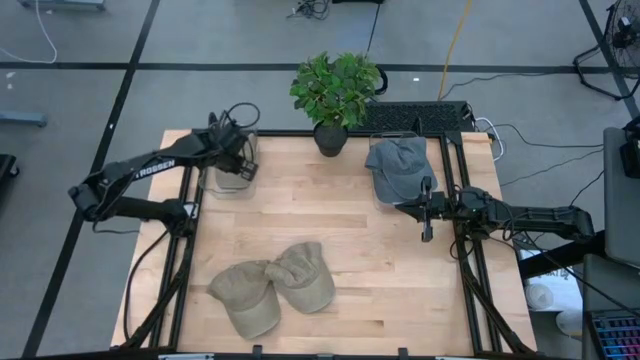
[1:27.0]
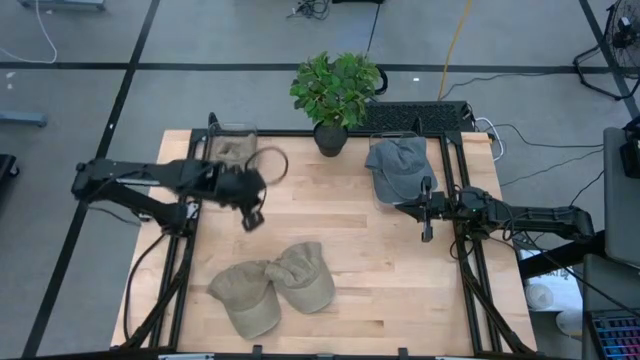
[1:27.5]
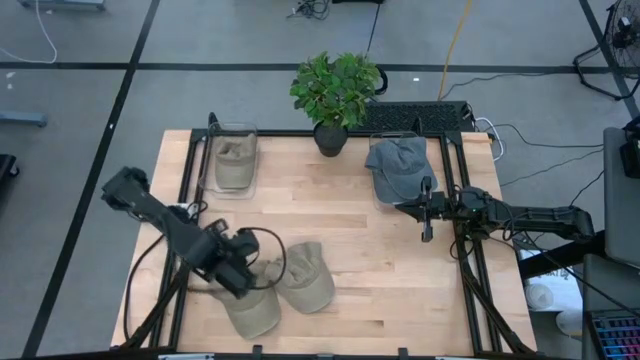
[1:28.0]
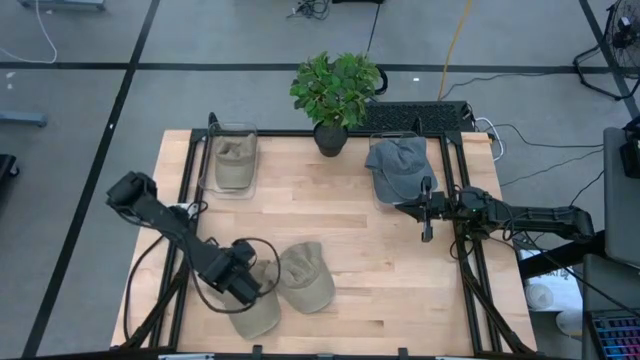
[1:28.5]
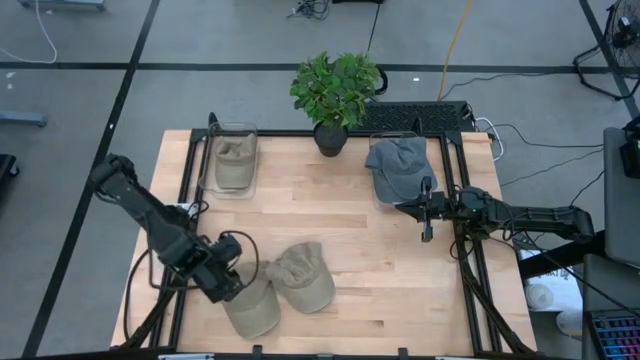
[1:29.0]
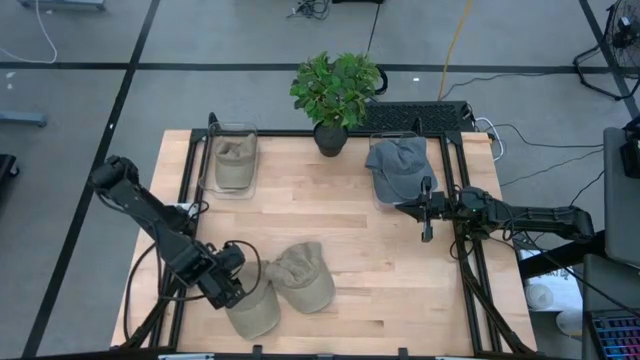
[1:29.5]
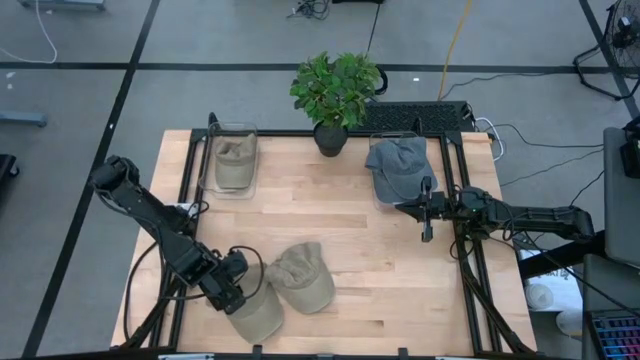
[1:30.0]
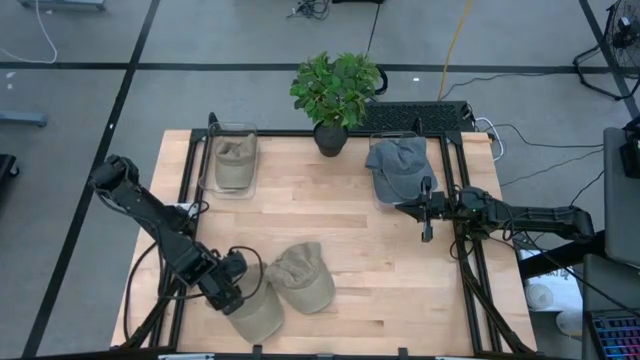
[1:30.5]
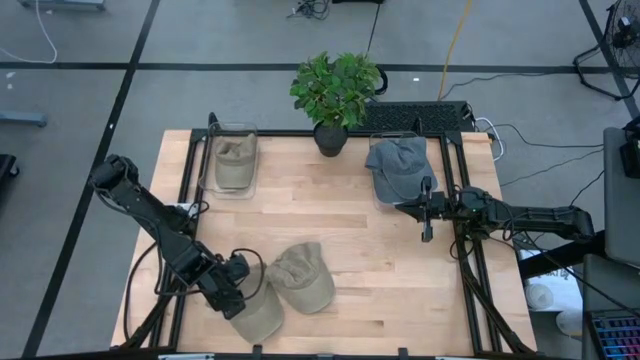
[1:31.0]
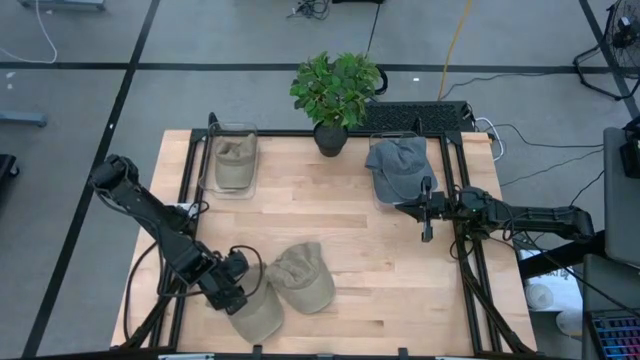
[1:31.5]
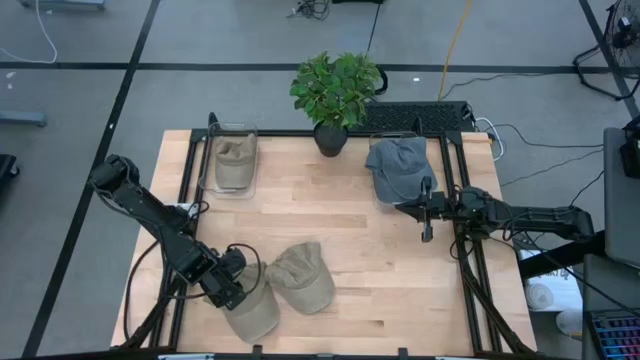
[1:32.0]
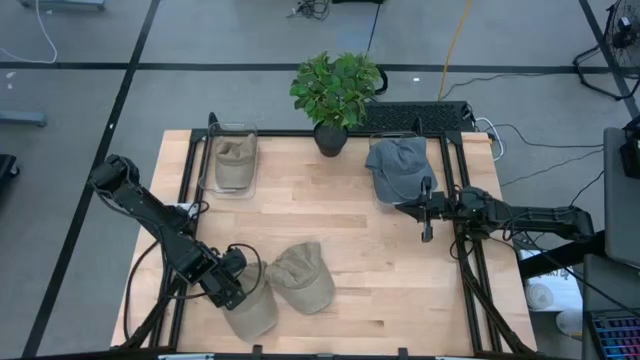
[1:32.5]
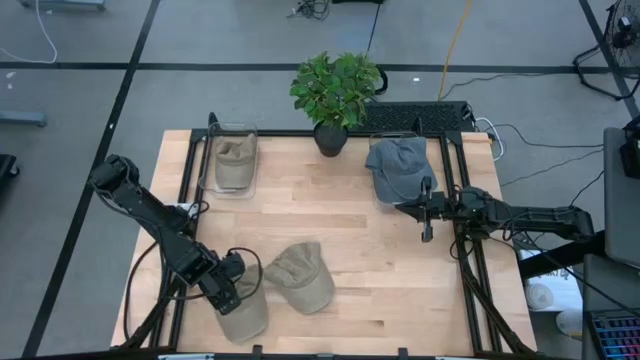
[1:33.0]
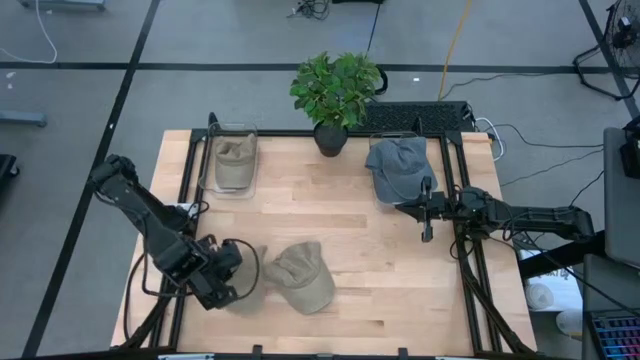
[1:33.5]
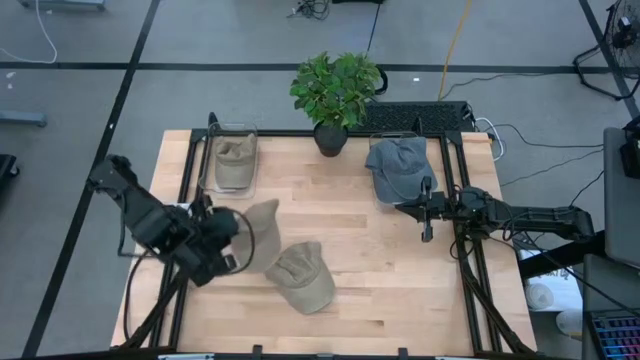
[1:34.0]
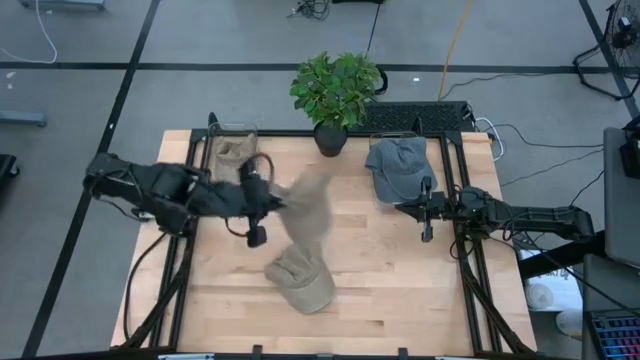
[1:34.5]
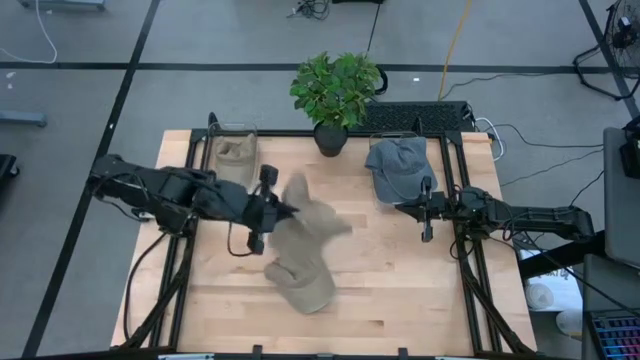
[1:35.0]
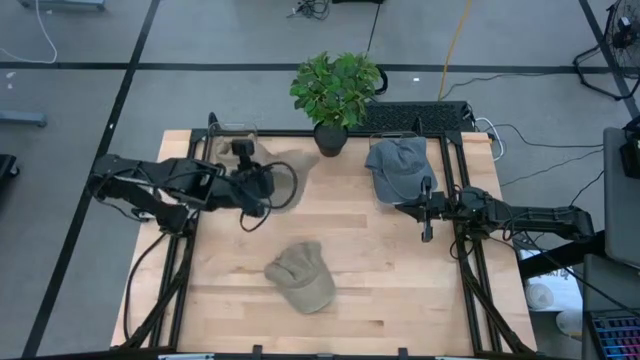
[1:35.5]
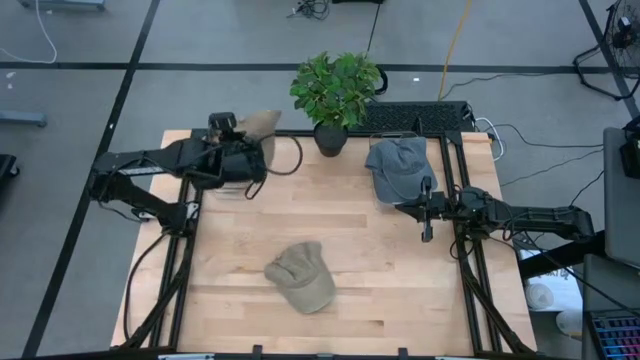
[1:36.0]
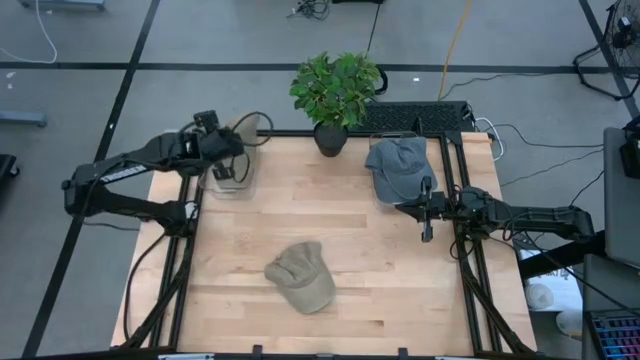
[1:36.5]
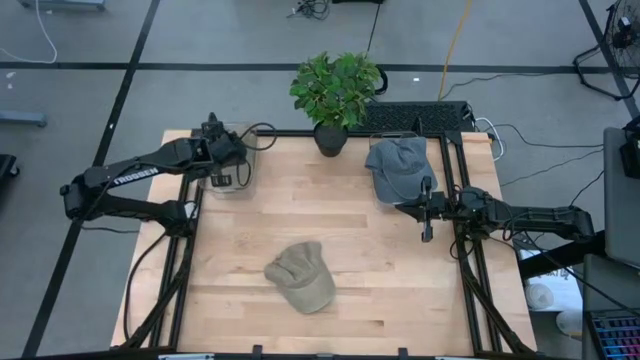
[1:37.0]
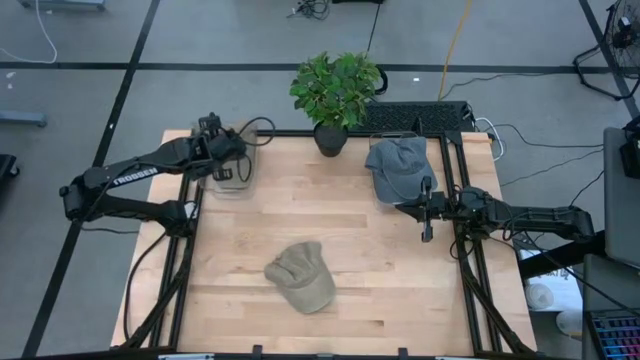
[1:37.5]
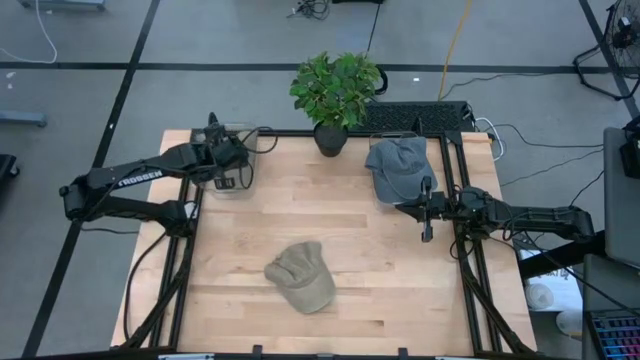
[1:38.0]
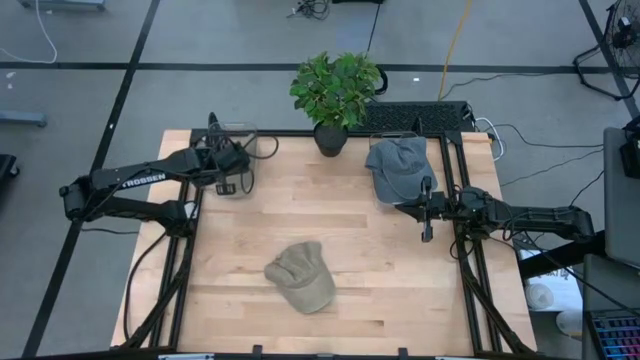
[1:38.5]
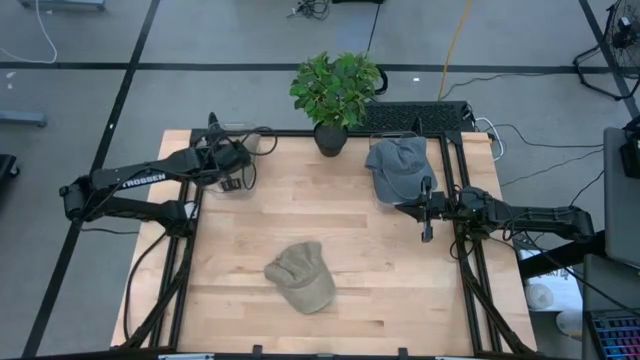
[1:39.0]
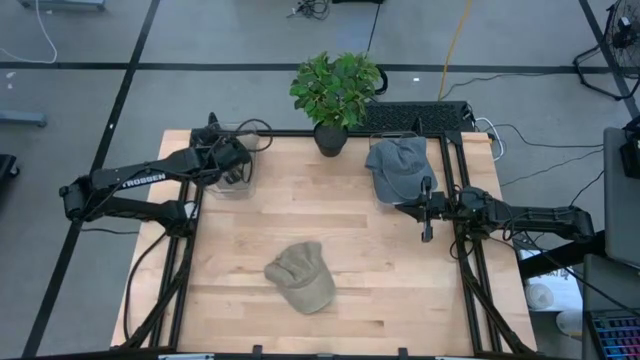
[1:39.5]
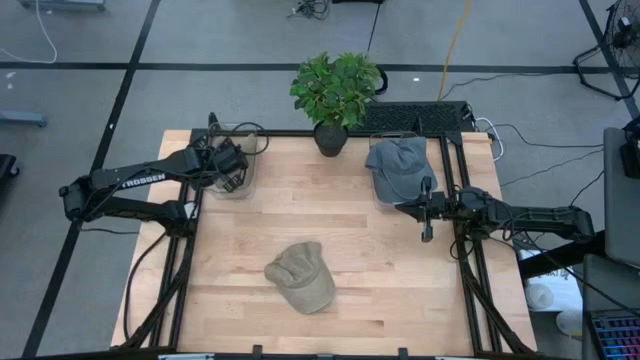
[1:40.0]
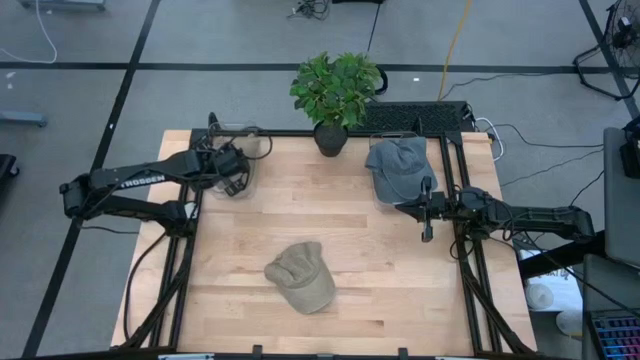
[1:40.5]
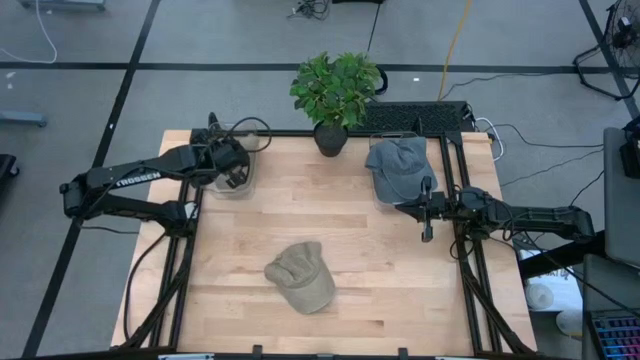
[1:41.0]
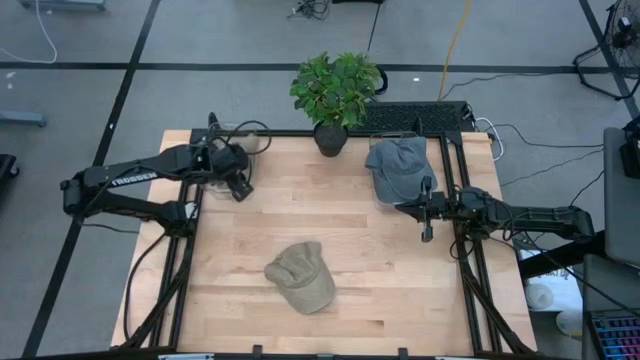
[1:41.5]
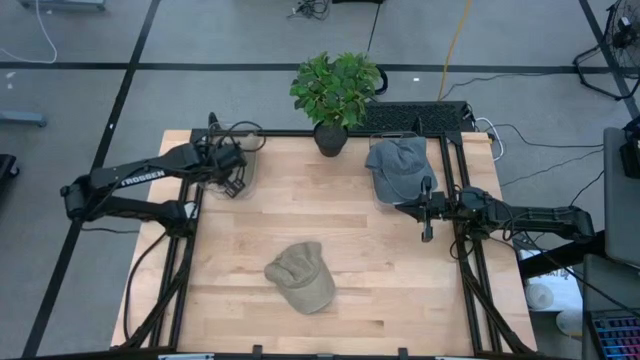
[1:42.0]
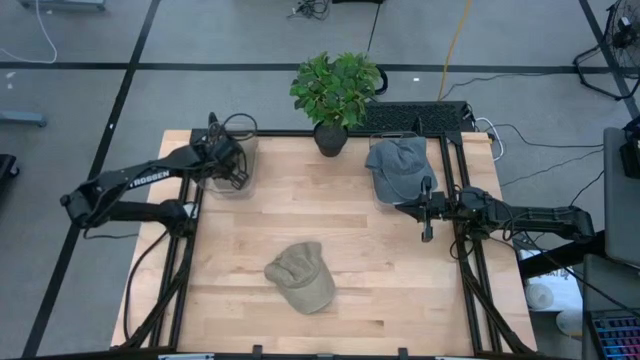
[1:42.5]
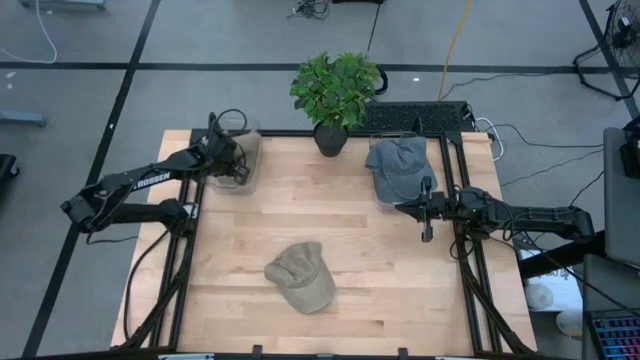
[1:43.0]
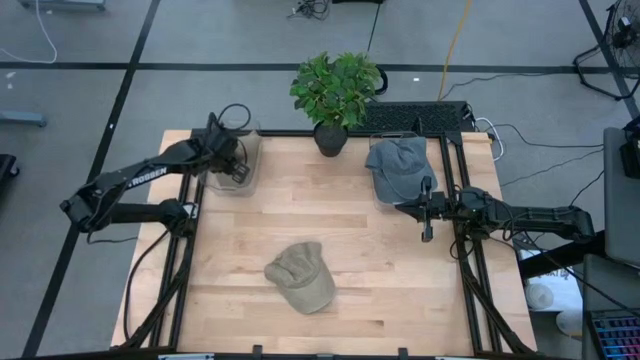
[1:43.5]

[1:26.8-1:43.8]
Task: Pick & Place hat
Put the left brown cap into the left transparent bin

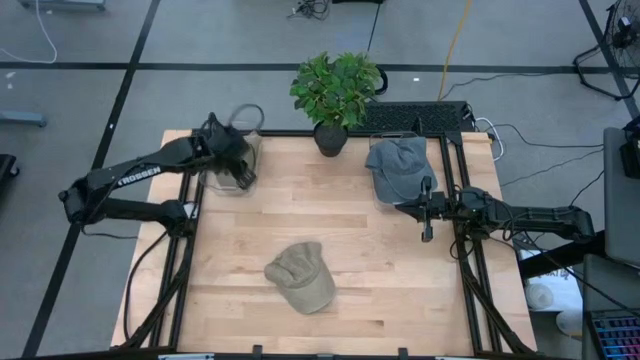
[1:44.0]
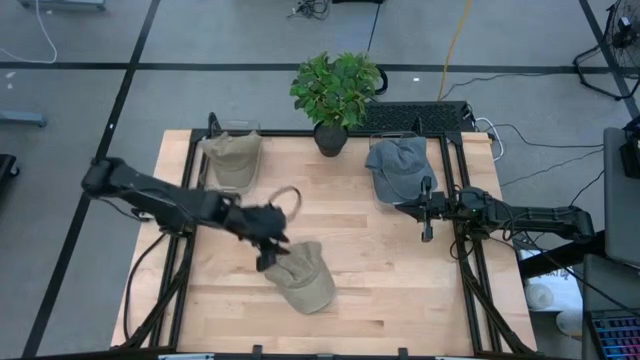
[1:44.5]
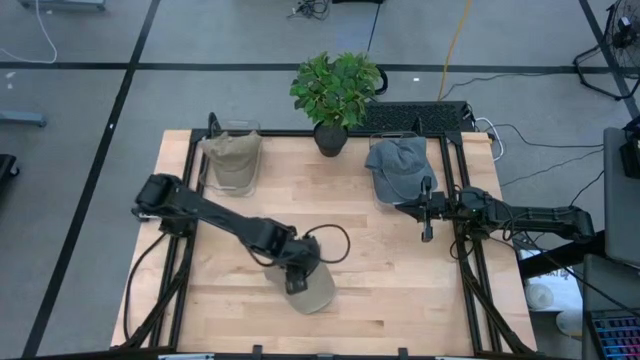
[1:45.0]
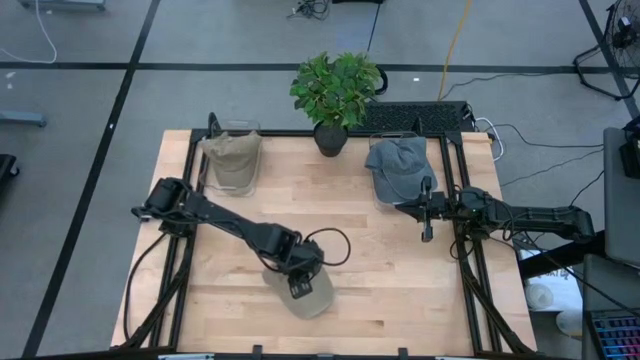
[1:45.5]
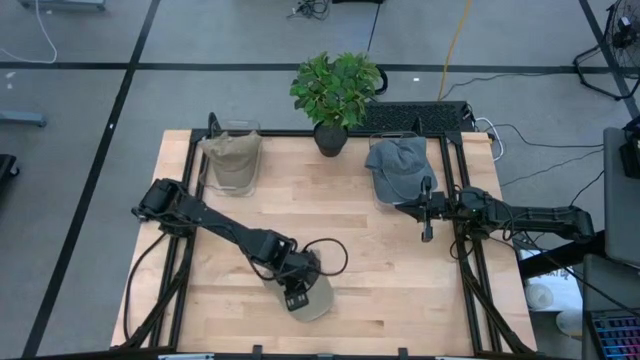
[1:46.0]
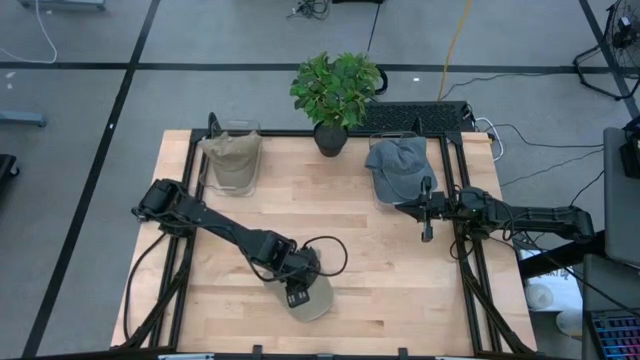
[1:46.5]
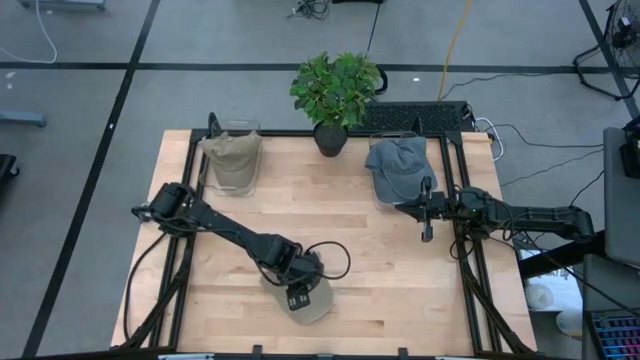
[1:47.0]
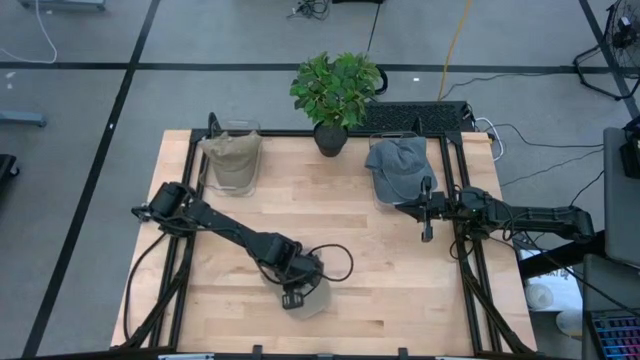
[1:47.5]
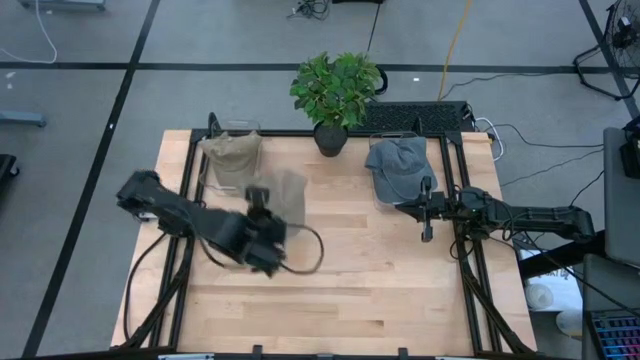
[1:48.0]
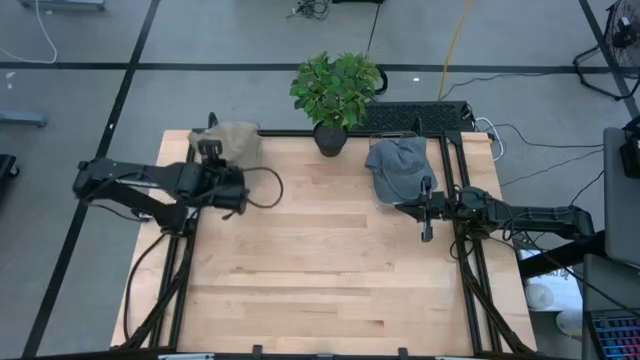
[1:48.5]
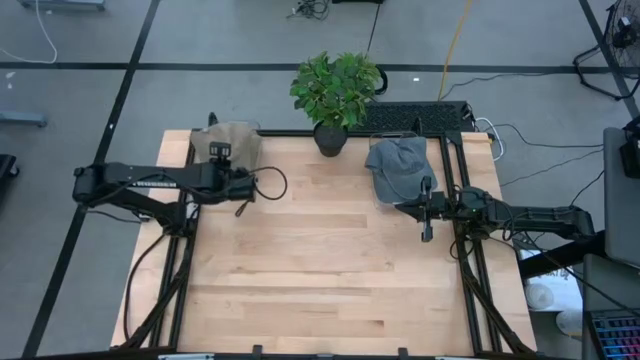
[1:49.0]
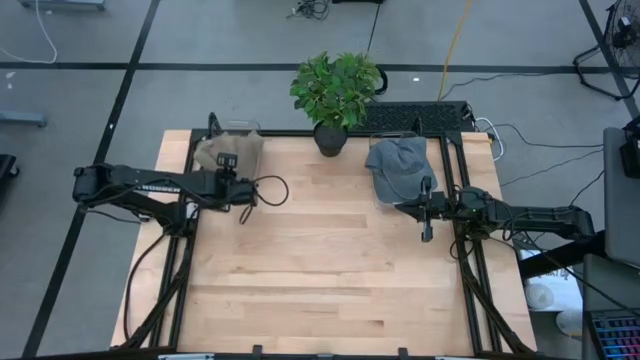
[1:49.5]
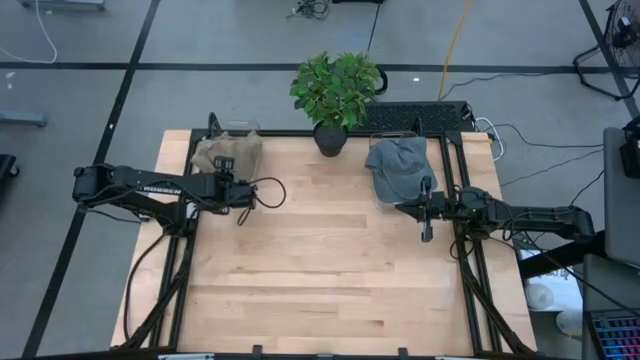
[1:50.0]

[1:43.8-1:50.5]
Put the brown cap into the left transparent bin
